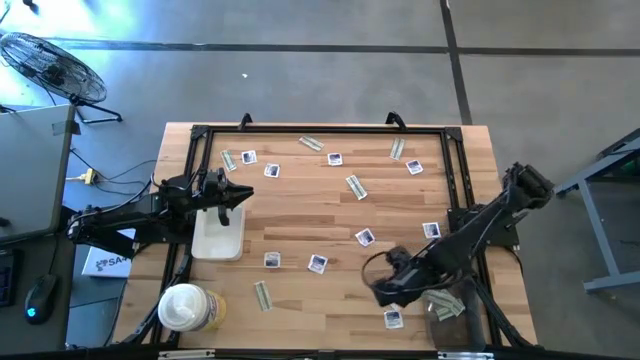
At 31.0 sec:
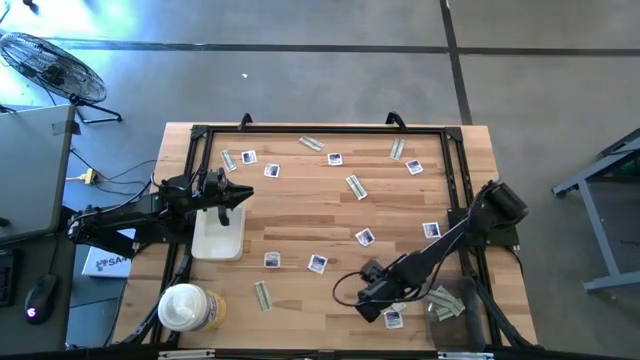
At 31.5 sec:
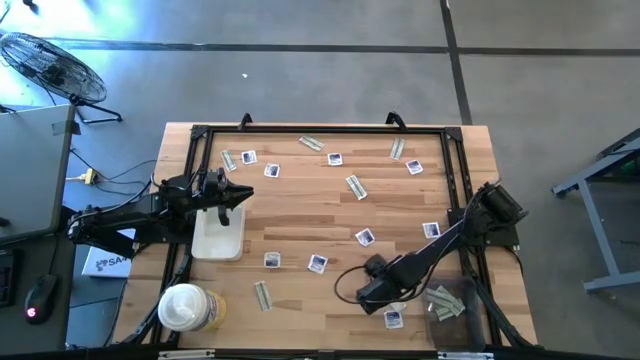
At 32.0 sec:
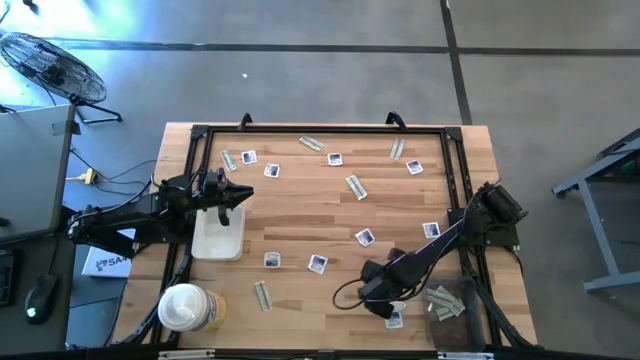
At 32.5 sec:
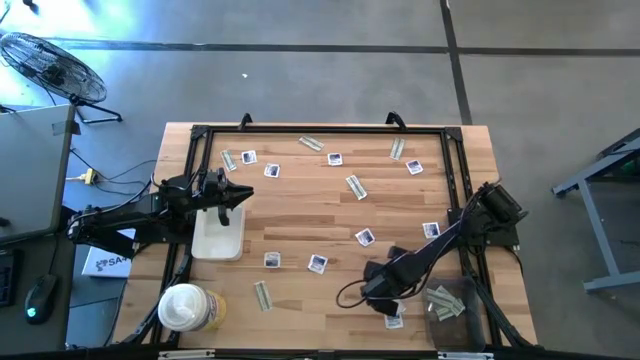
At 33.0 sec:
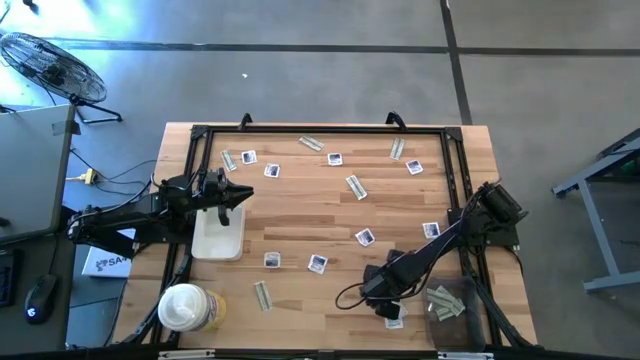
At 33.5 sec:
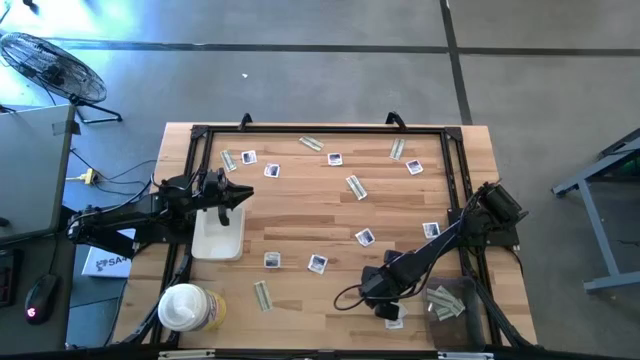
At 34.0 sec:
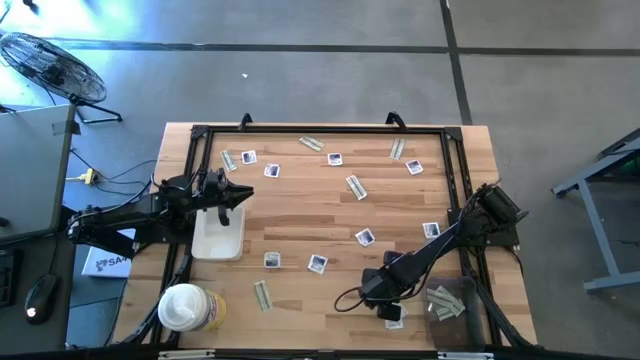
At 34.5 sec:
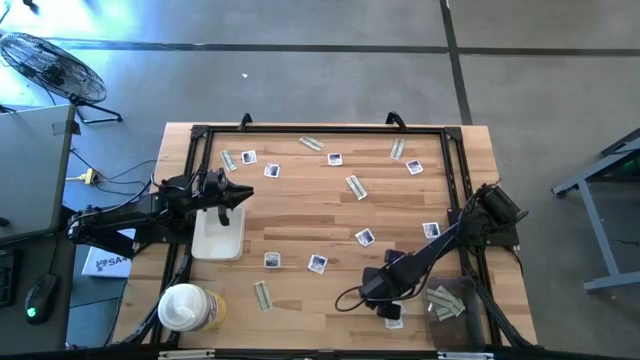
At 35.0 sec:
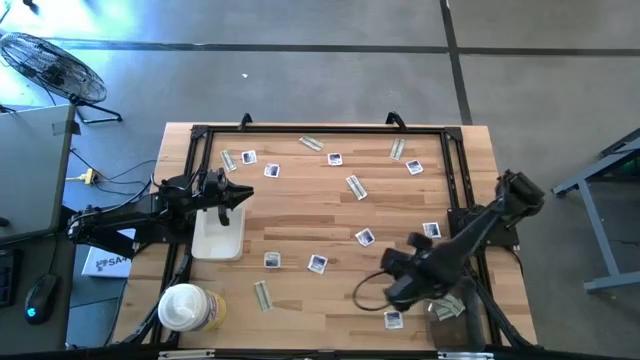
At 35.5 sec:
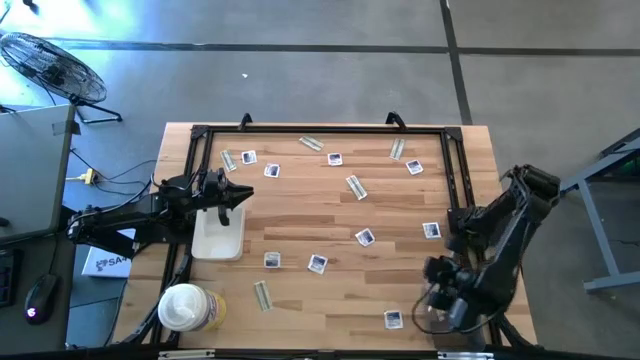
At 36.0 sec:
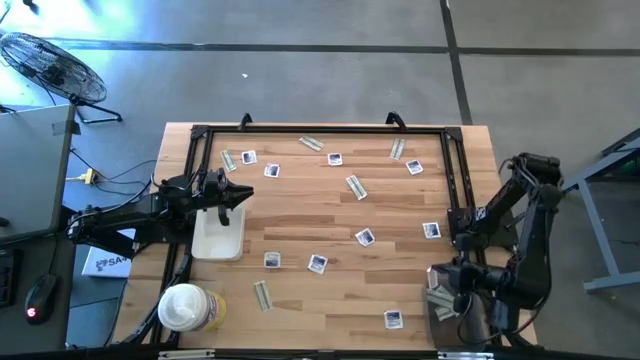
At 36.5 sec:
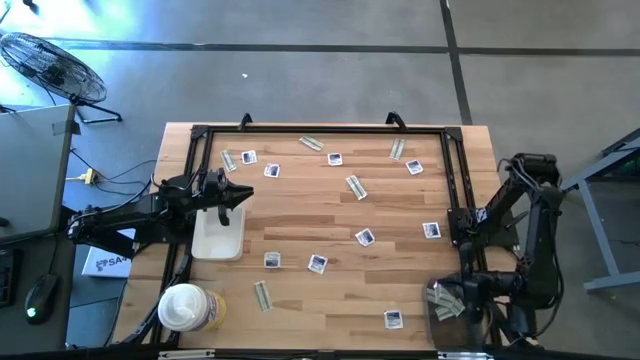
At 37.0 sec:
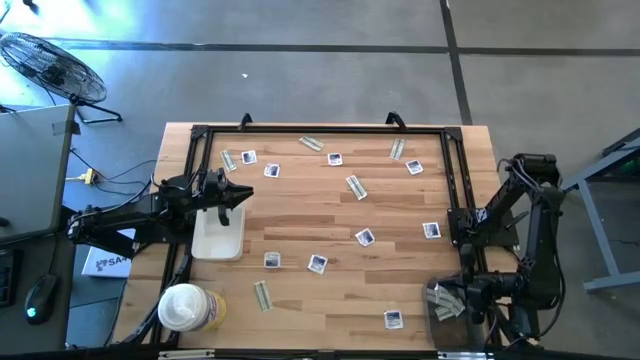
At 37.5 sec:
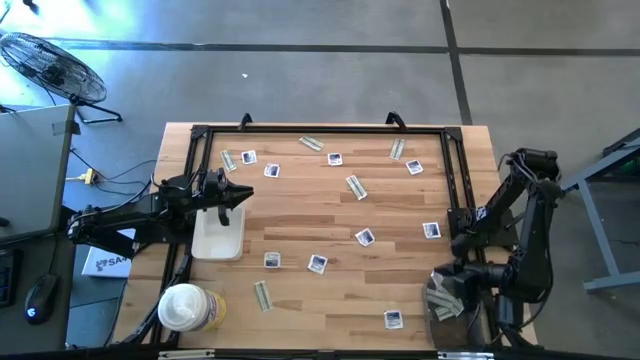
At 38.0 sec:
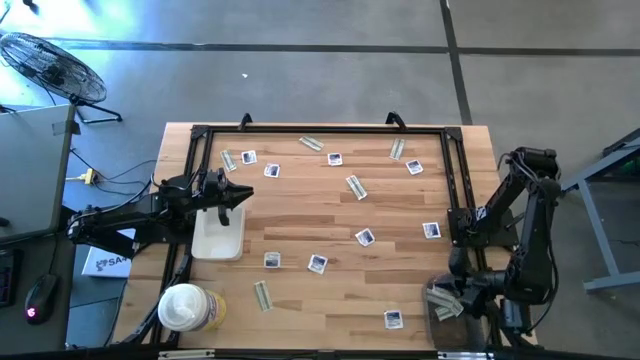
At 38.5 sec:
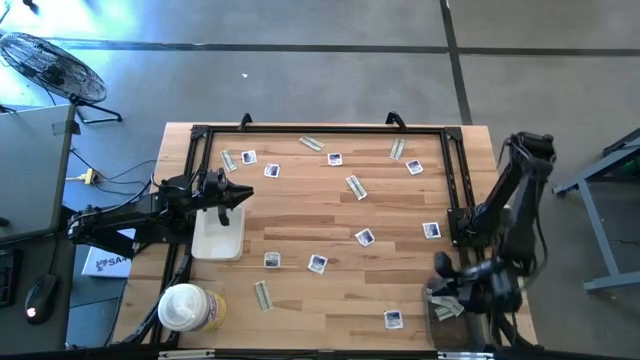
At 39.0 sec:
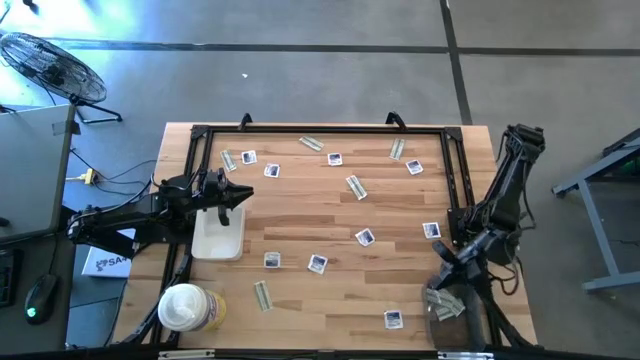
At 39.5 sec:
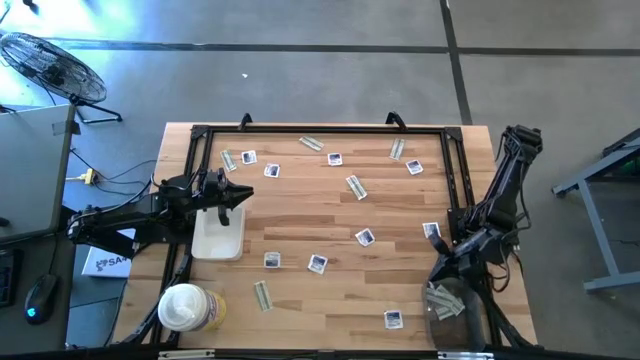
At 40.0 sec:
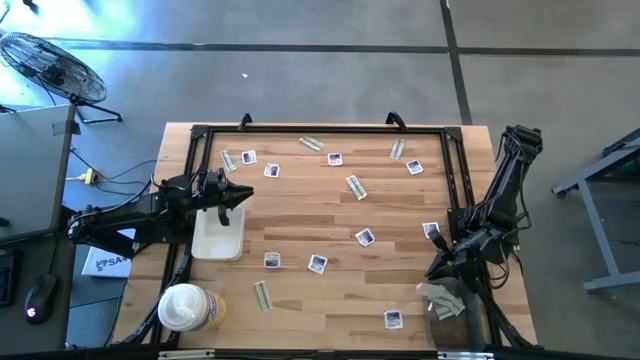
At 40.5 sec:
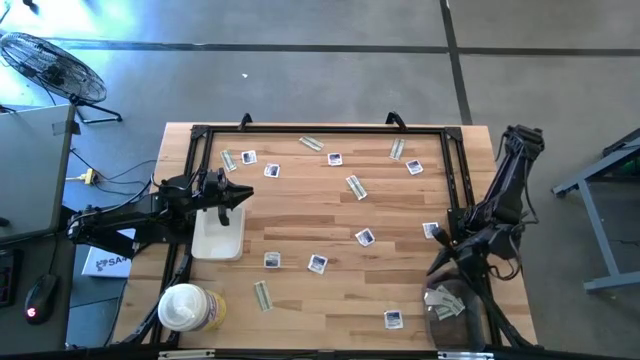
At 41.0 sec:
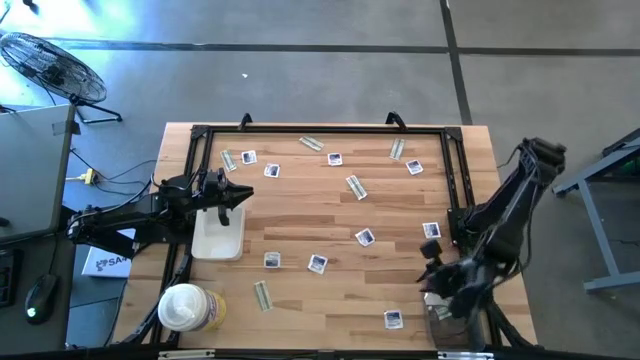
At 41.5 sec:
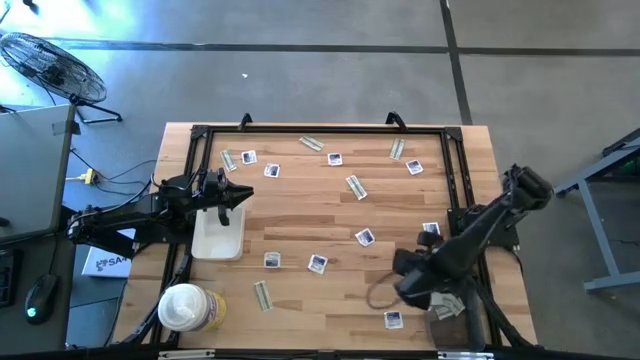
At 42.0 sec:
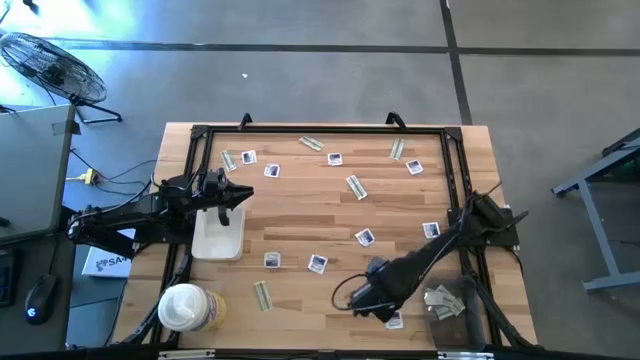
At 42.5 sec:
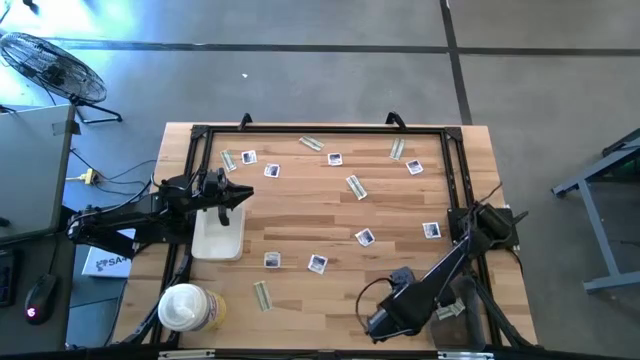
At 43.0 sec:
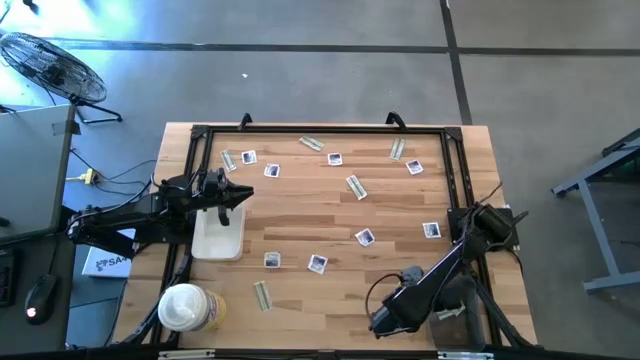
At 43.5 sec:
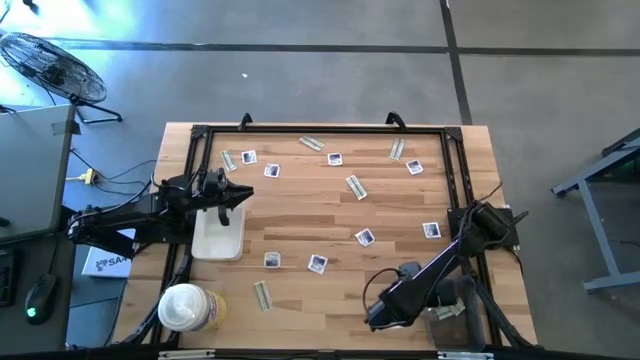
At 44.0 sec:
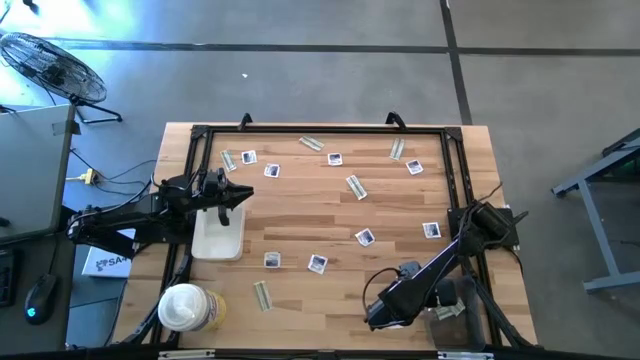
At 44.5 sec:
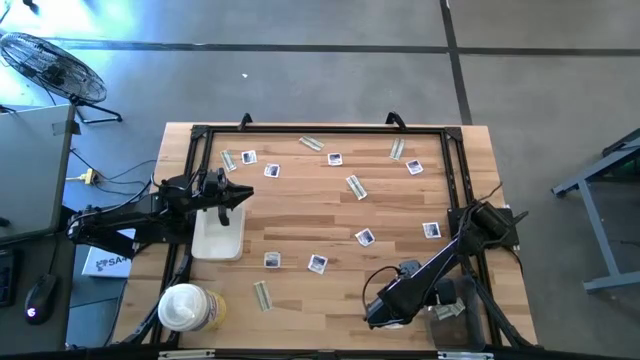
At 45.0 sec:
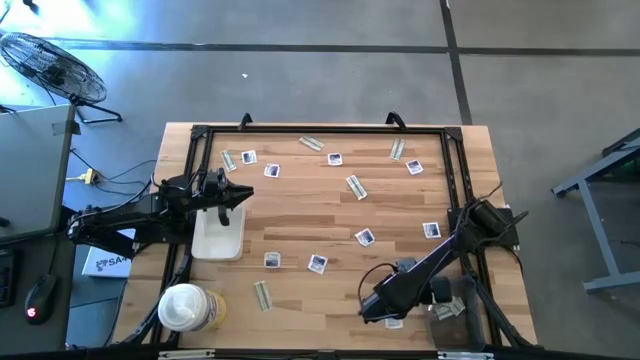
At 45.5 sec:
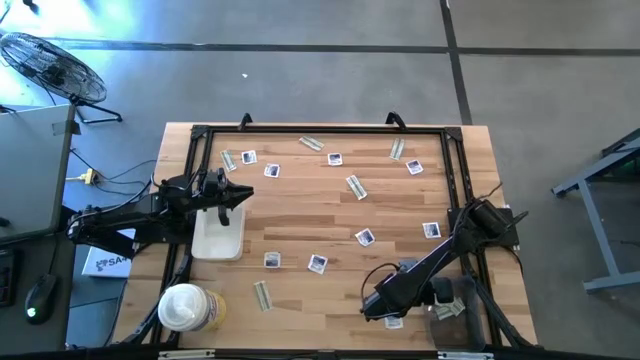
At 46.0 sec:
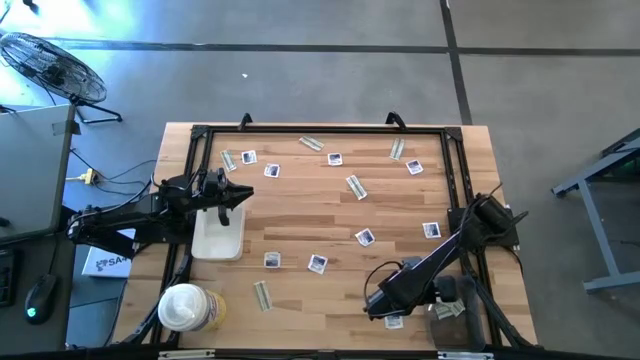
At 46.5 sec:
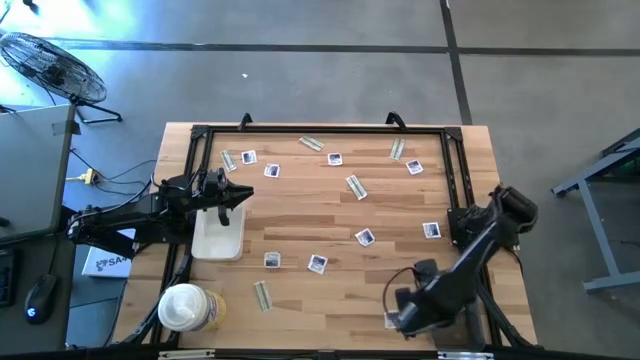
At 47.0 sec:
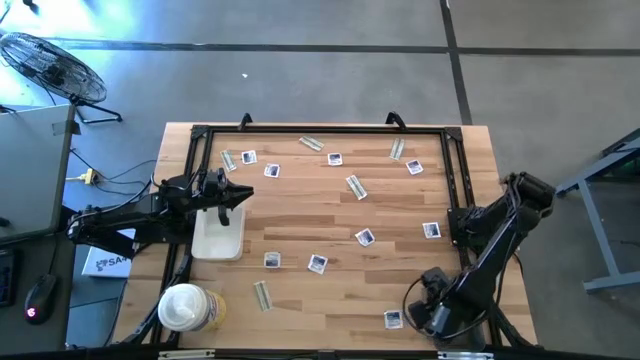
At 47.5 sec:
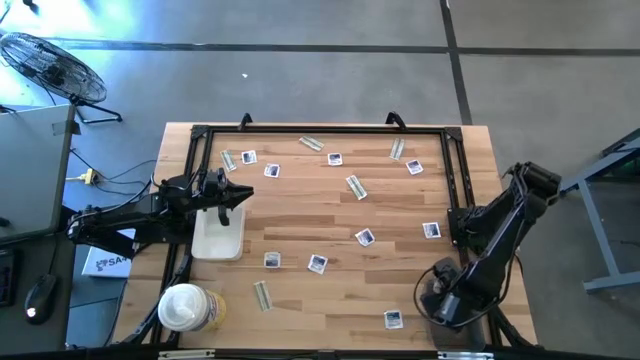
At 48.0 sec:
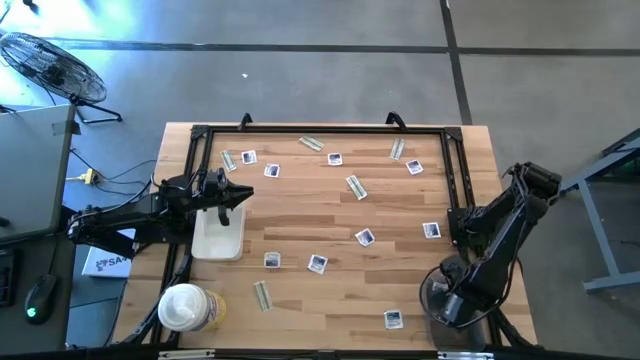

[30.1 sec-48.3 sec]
Task: Pick & Place First Aid Supplies
Put the green bandage pack into the black bin
